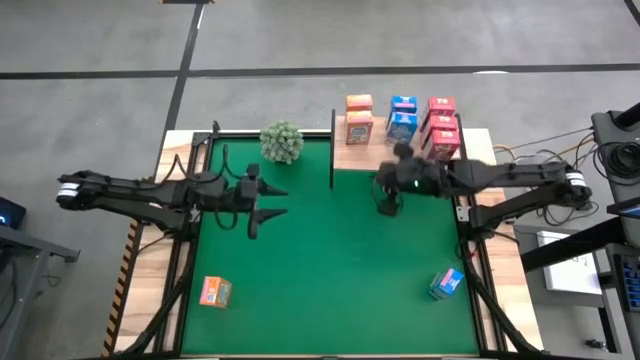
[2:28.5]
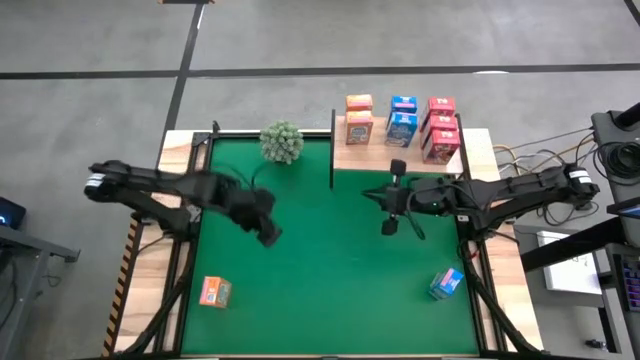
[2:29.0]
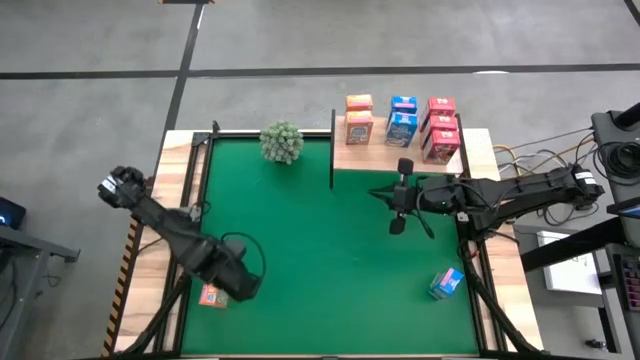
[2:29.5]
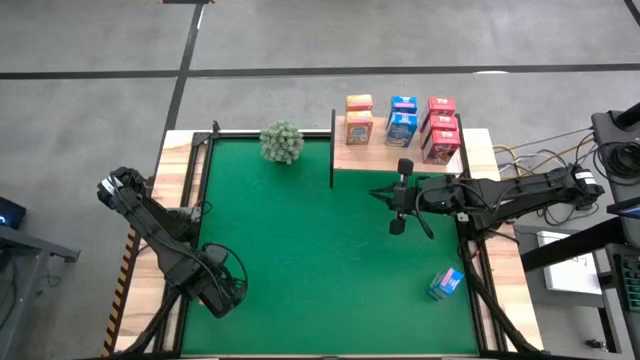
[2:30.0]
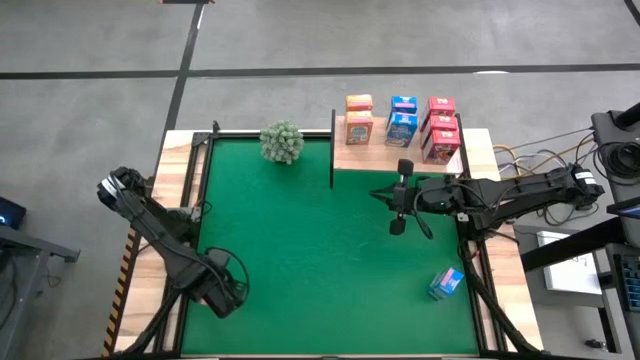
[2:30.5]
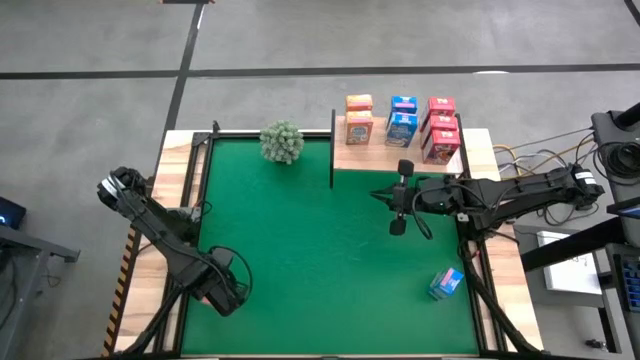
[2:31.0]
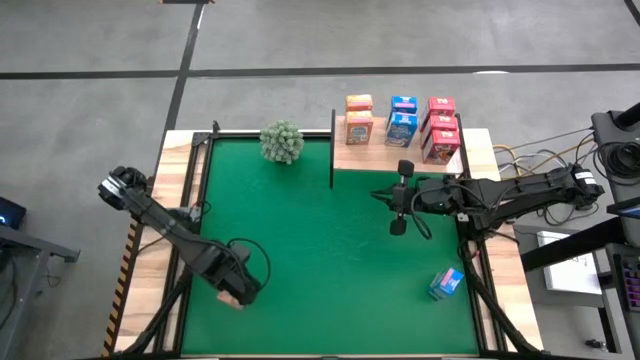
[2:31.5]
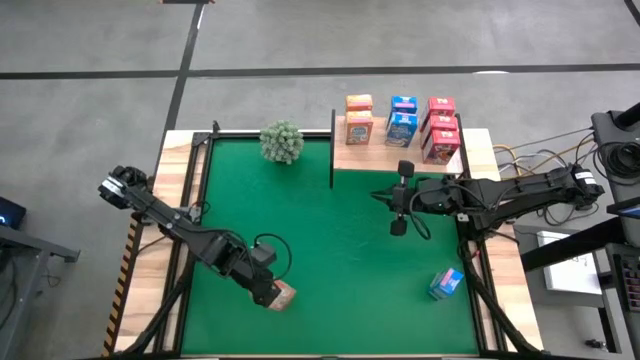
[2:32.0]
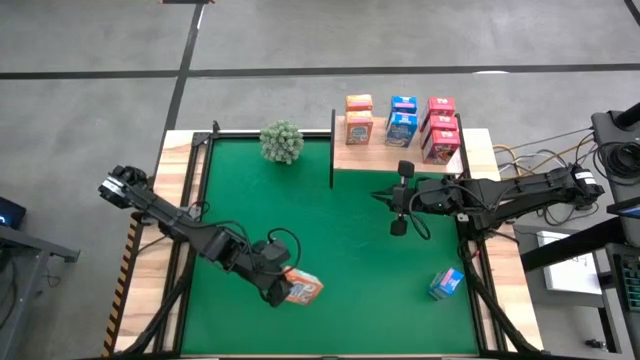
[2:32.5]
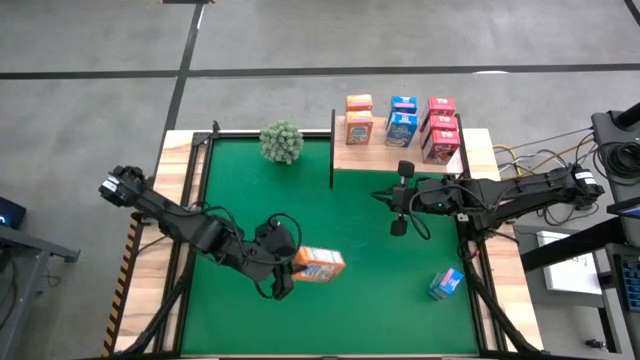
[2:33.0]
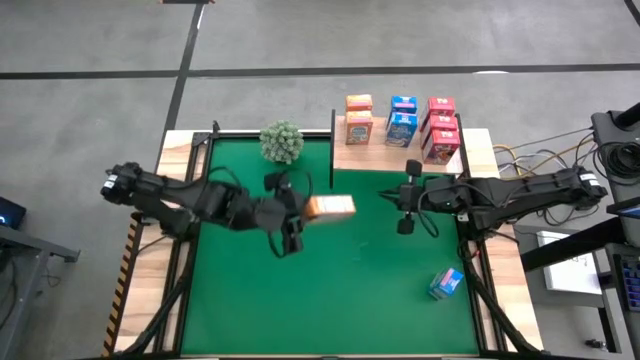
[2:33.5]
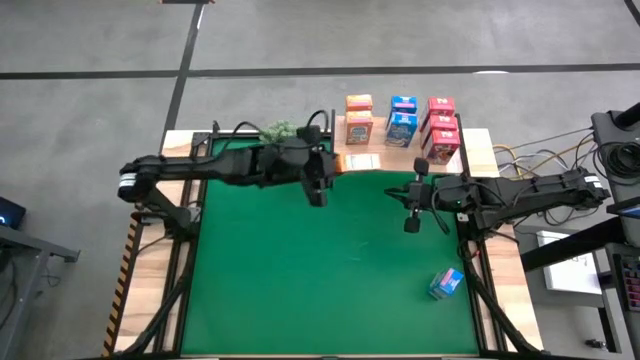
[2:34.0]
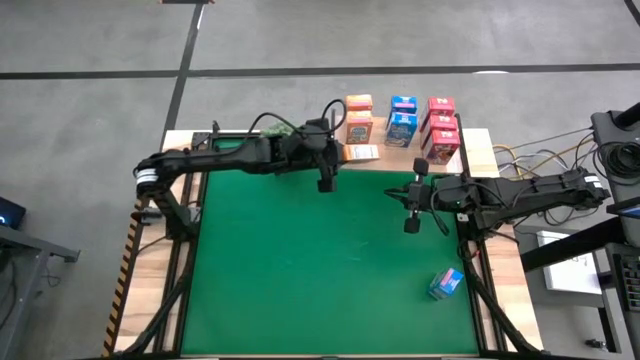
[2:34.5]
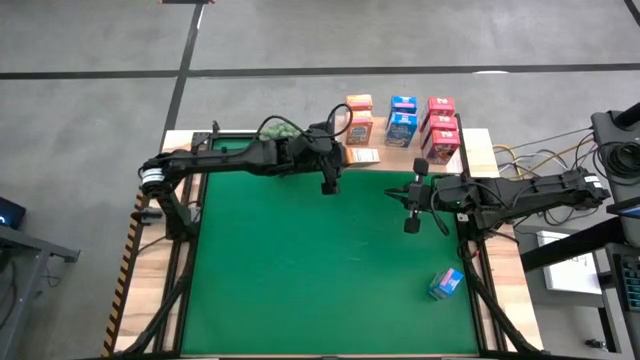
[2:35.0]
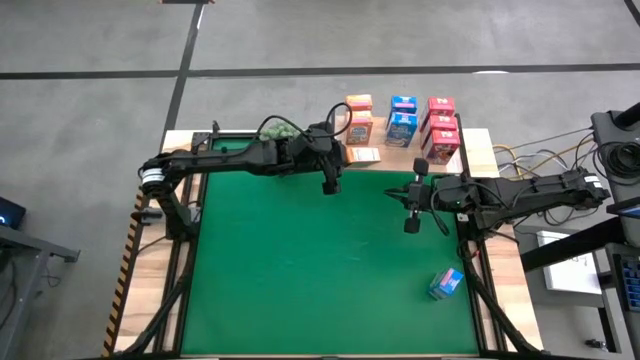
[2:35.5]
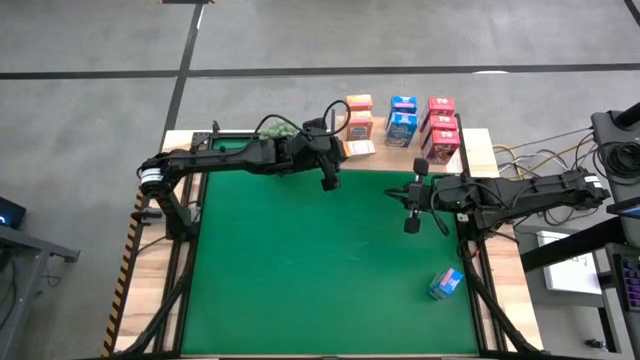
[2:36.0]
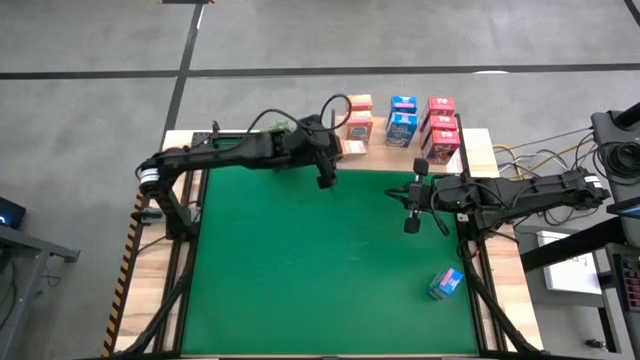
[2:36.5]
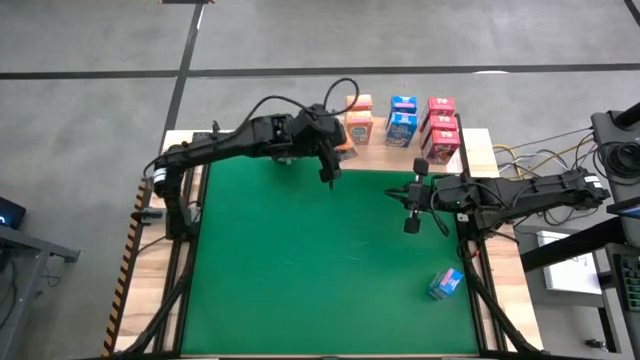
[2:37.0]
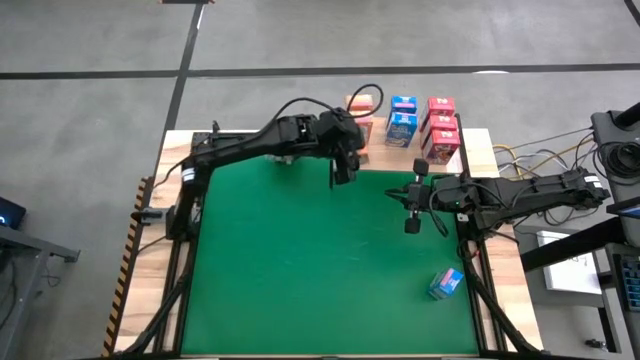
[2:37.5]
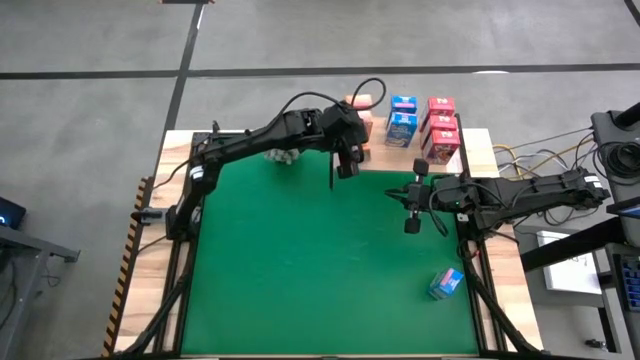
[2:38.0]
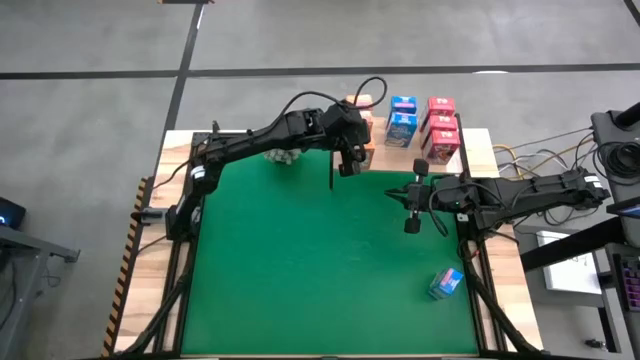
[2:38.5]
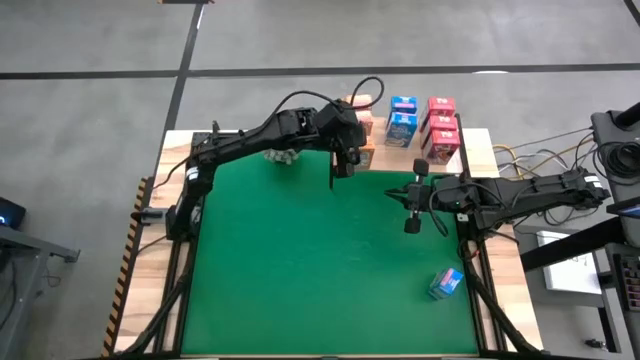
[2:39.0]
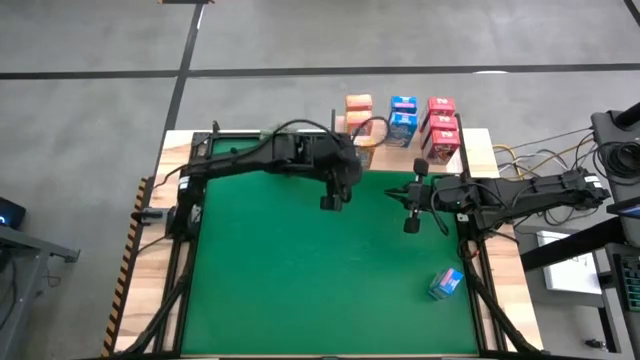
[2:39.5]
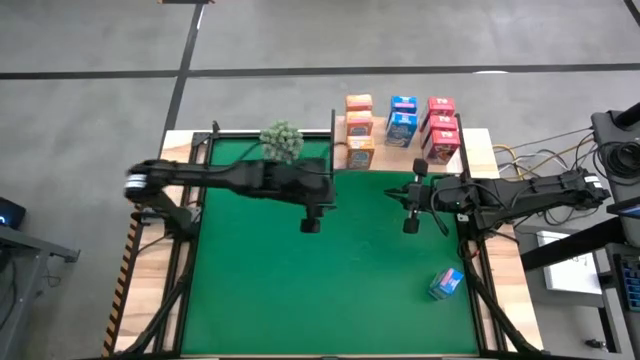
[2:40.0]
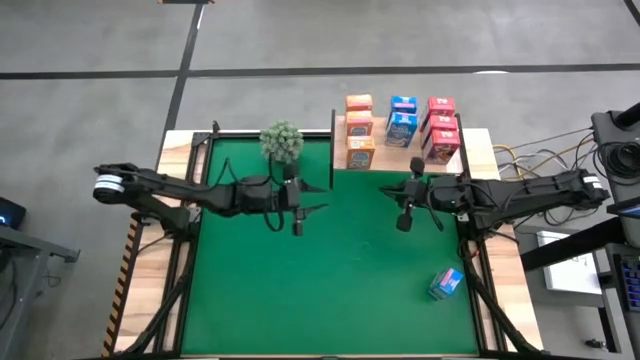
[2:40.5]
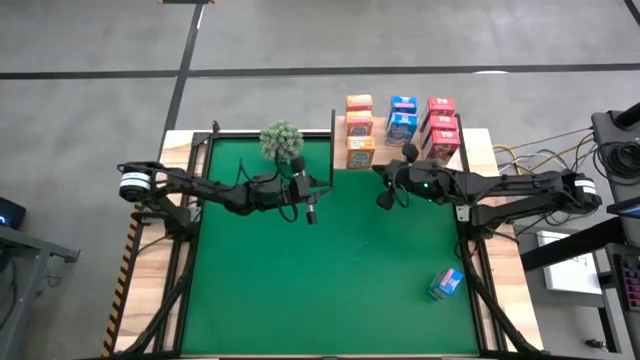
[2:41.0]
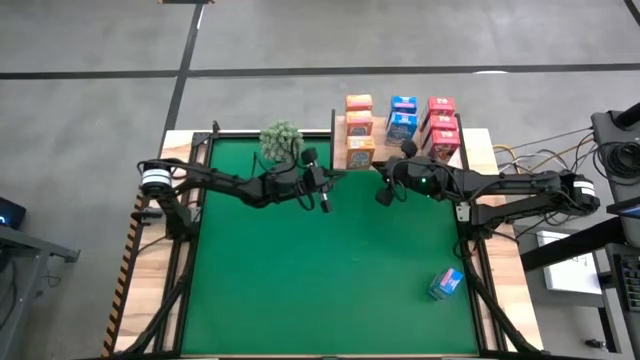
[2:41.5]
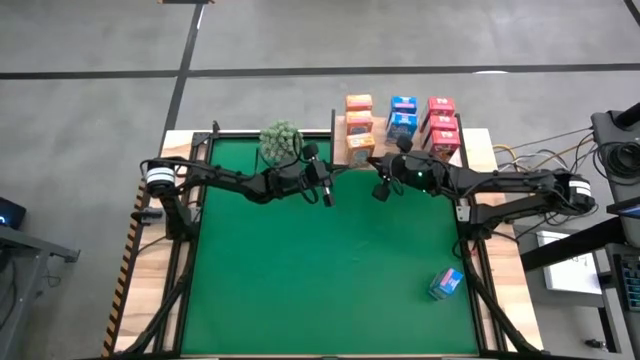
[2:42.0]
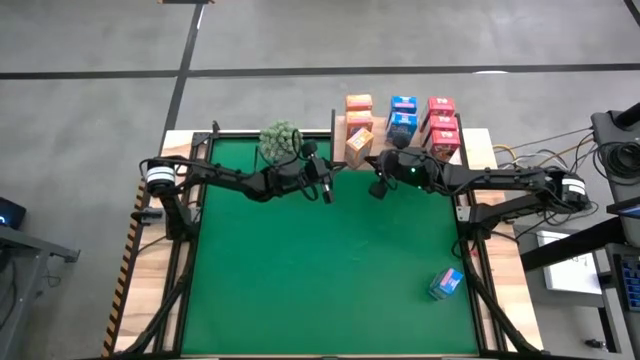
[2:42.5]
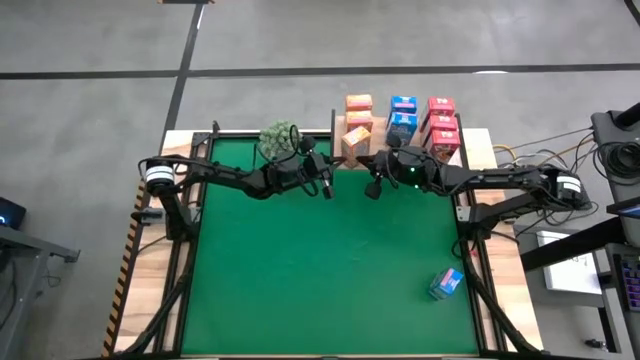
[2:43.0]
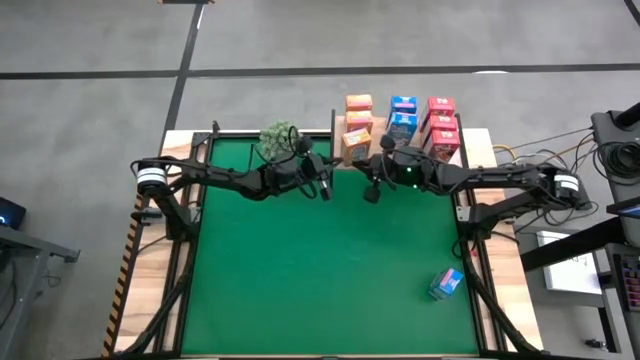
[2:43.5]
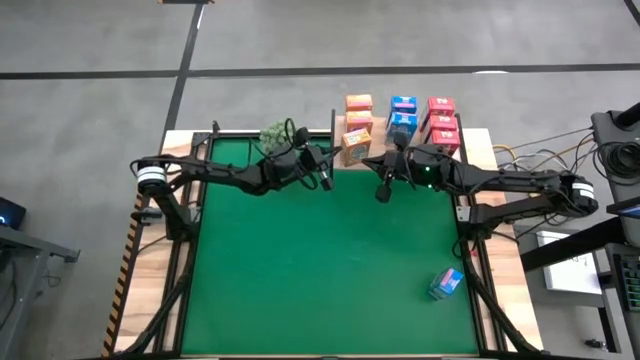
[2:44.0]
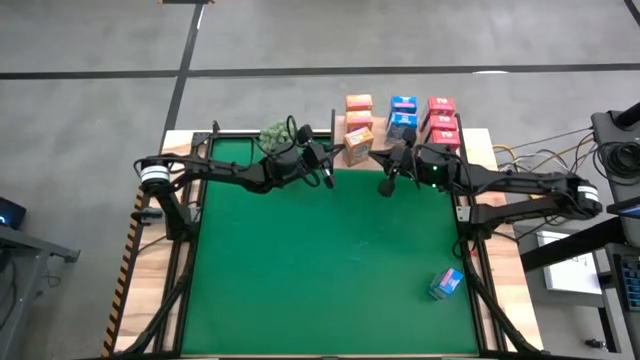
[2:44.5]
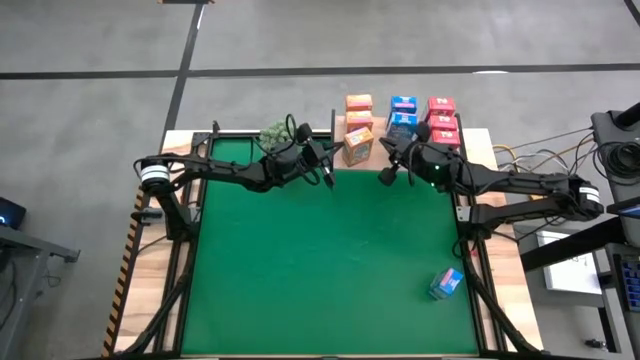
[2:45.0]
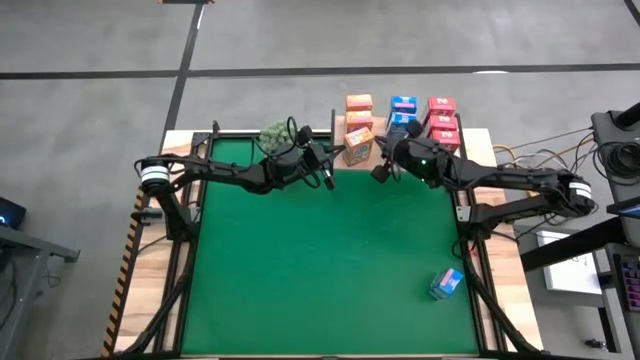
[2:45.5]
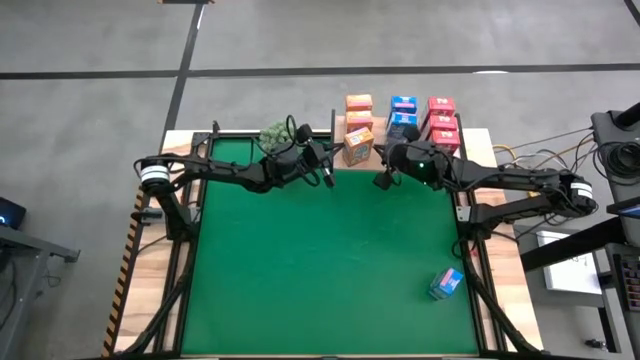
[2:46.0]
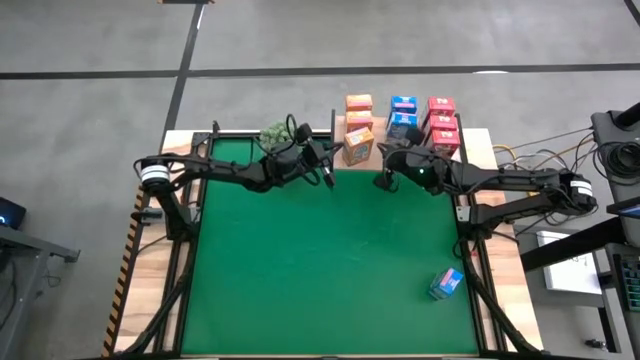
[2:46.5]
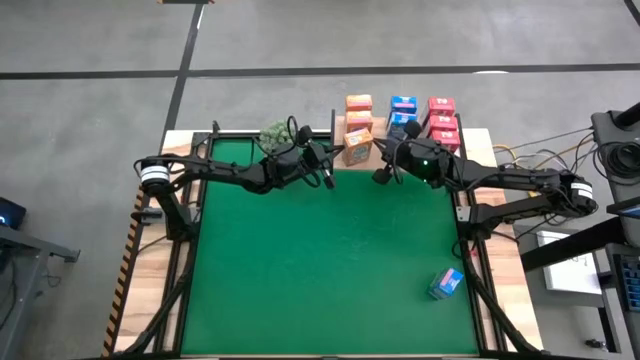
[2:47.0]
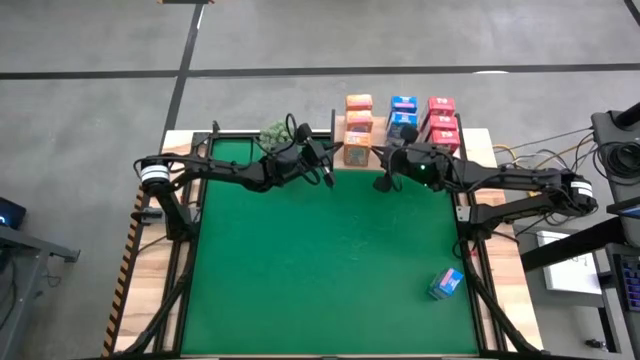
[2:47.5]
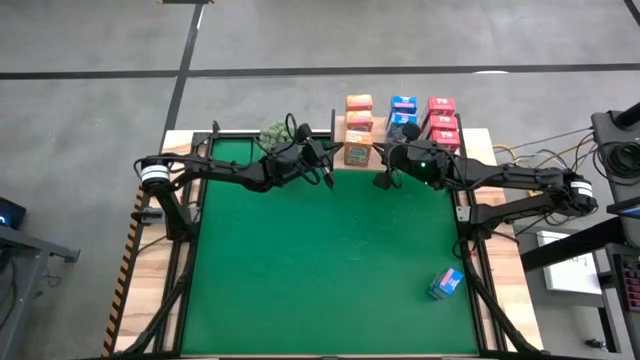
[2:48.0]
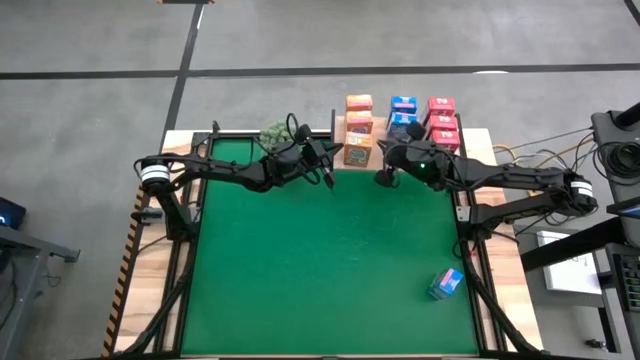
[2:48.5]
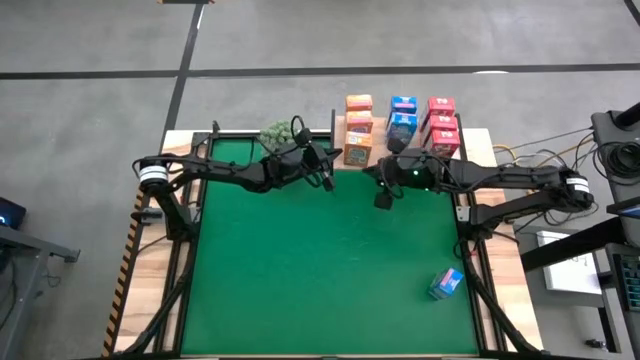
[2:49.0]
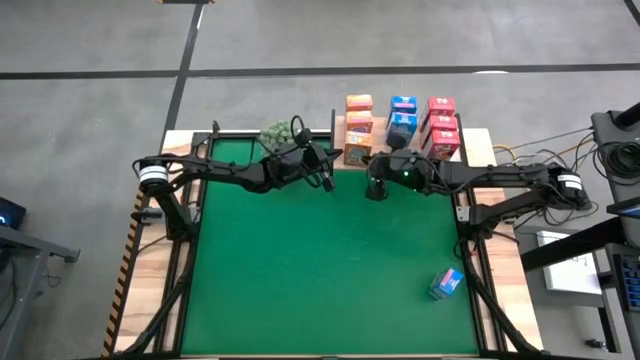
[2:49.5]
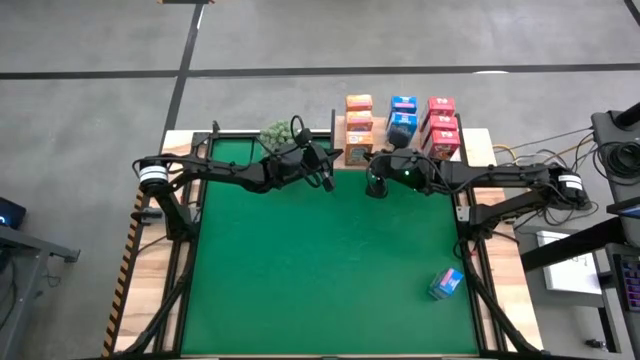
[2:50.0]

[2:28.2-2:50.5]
Task: Stack cereal on shelf
Put the orange cereal box on the shelf
